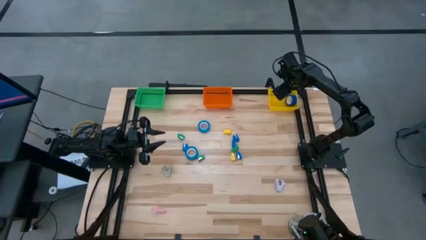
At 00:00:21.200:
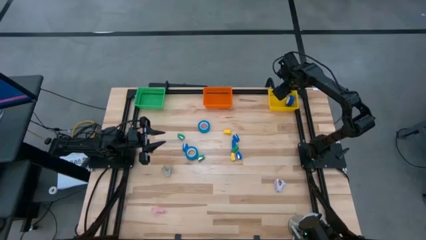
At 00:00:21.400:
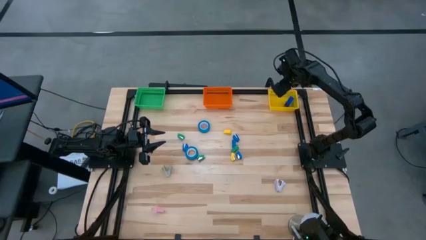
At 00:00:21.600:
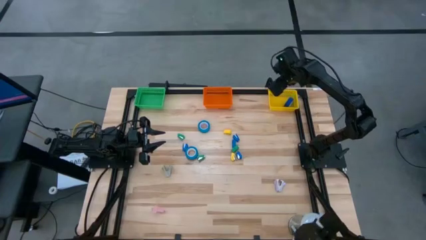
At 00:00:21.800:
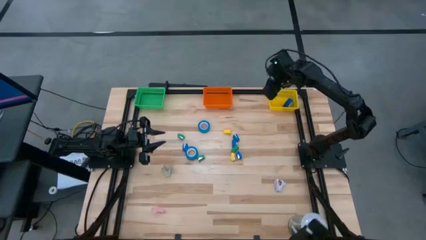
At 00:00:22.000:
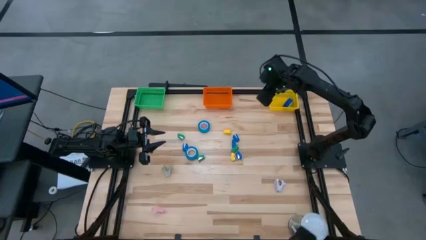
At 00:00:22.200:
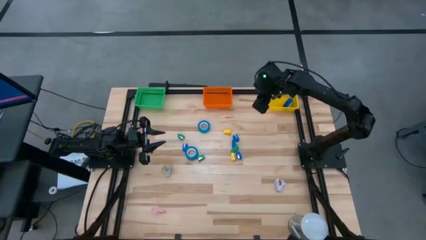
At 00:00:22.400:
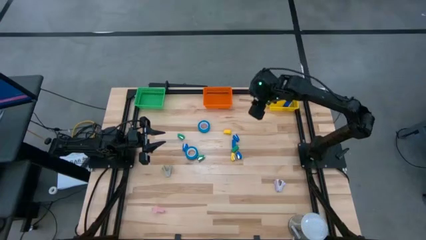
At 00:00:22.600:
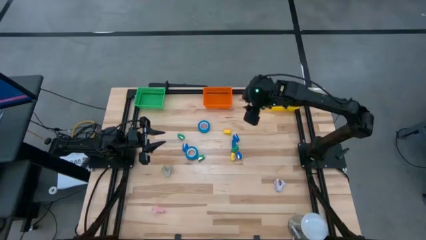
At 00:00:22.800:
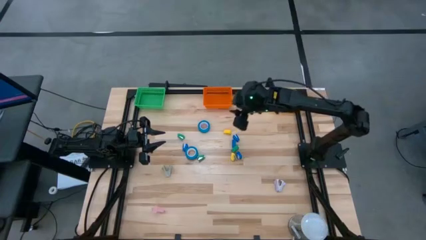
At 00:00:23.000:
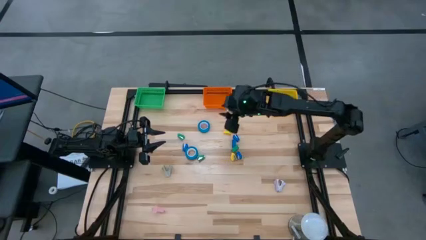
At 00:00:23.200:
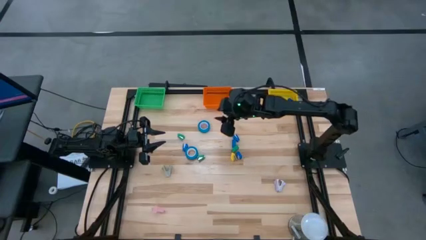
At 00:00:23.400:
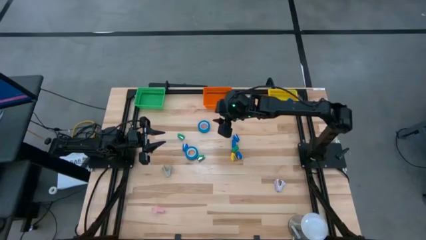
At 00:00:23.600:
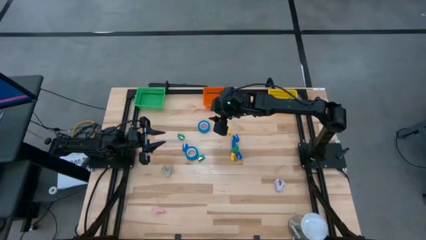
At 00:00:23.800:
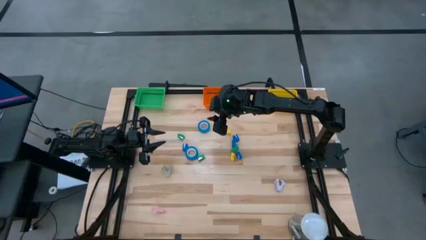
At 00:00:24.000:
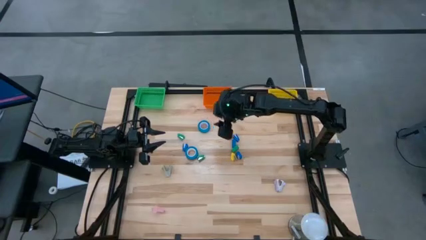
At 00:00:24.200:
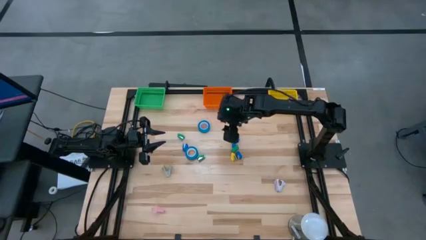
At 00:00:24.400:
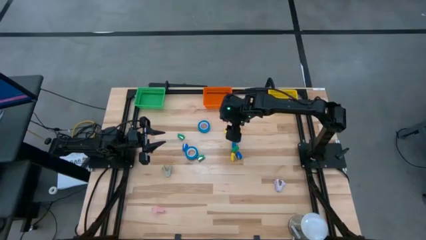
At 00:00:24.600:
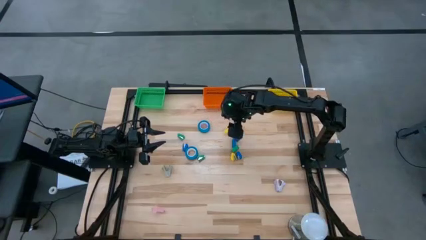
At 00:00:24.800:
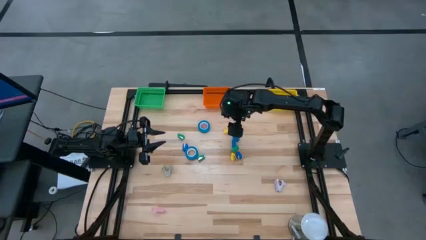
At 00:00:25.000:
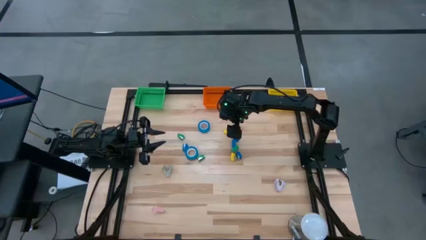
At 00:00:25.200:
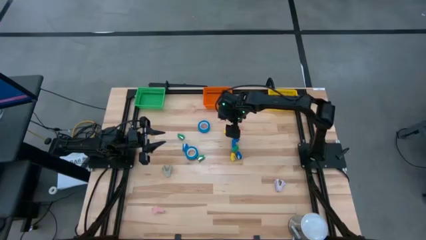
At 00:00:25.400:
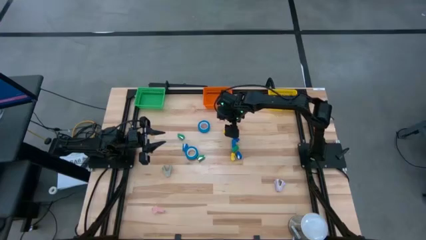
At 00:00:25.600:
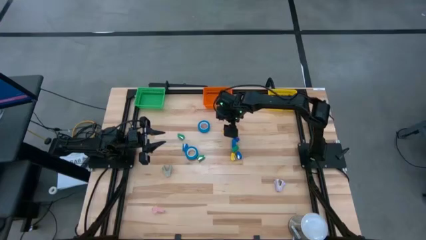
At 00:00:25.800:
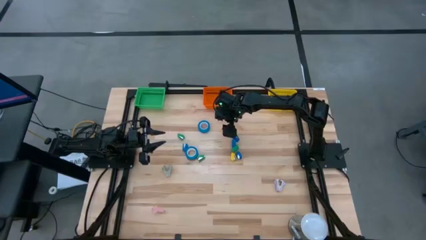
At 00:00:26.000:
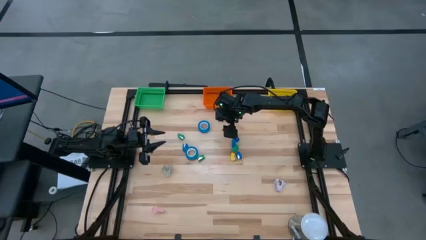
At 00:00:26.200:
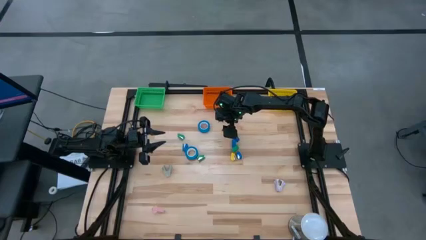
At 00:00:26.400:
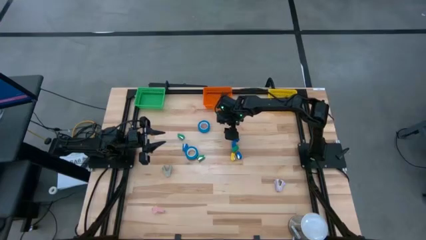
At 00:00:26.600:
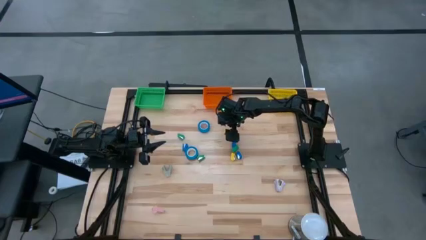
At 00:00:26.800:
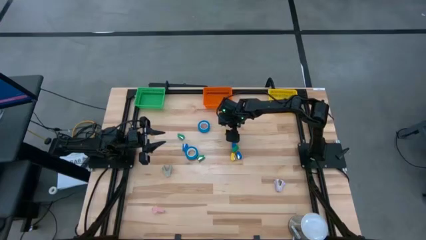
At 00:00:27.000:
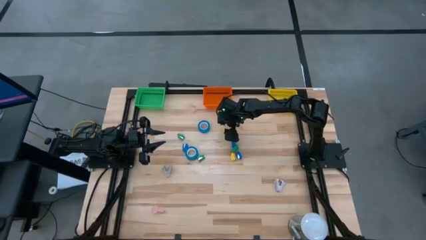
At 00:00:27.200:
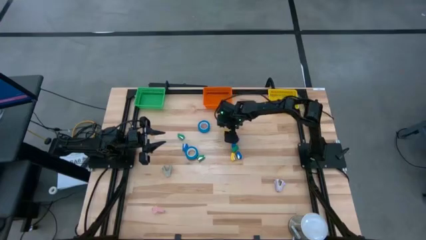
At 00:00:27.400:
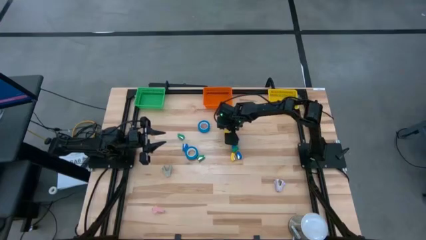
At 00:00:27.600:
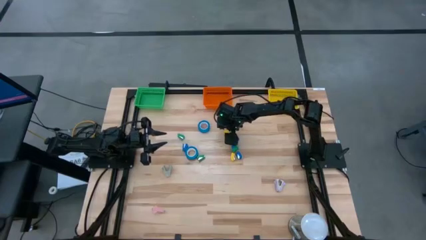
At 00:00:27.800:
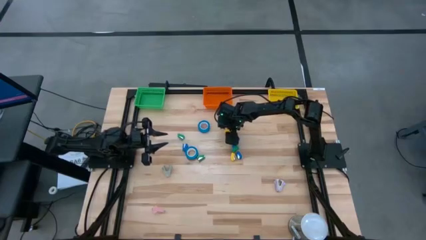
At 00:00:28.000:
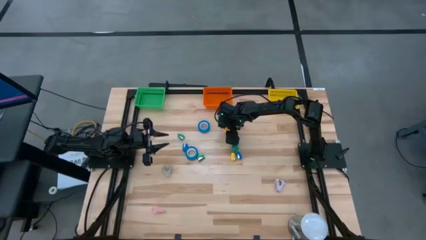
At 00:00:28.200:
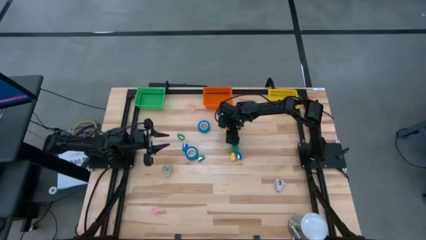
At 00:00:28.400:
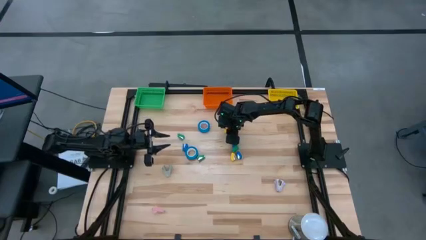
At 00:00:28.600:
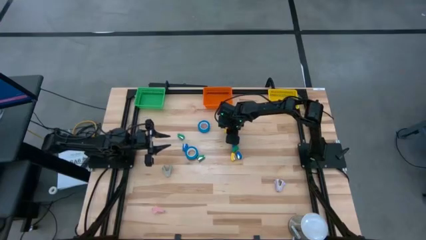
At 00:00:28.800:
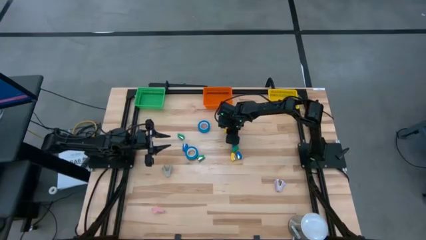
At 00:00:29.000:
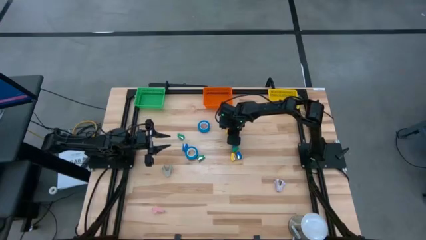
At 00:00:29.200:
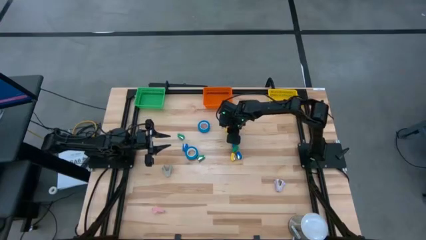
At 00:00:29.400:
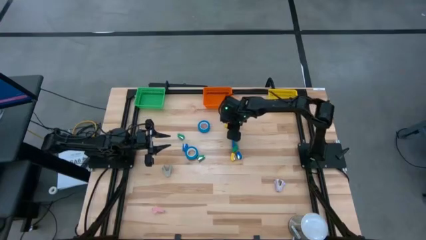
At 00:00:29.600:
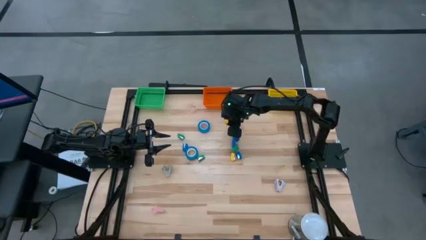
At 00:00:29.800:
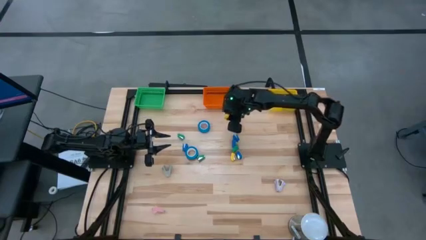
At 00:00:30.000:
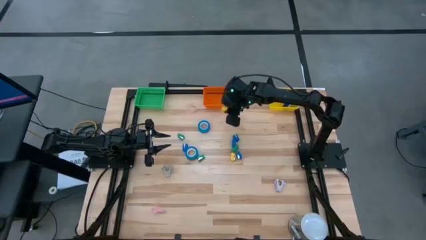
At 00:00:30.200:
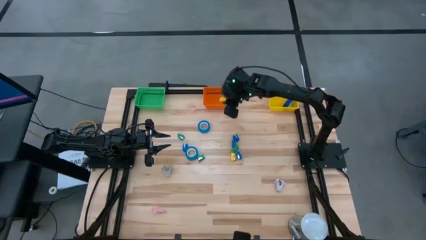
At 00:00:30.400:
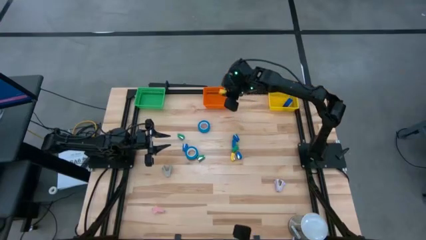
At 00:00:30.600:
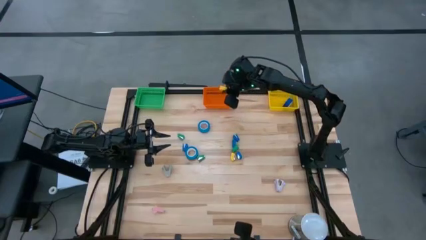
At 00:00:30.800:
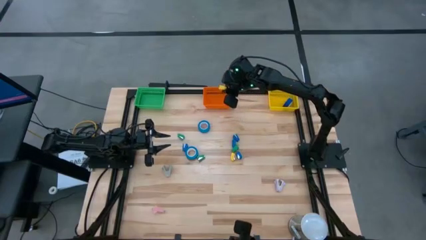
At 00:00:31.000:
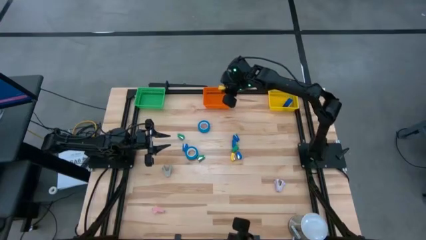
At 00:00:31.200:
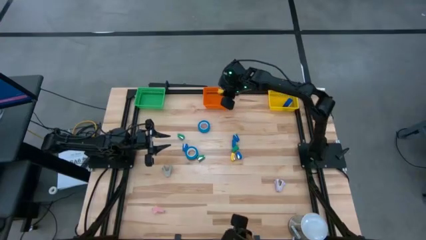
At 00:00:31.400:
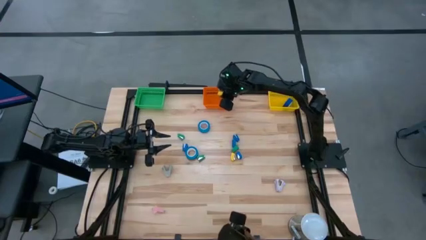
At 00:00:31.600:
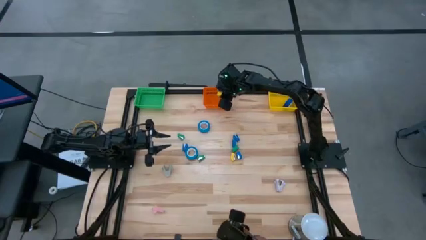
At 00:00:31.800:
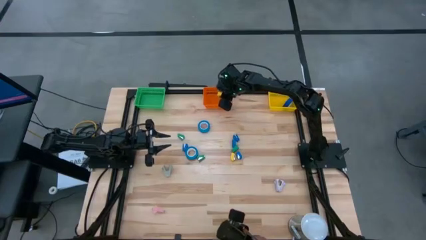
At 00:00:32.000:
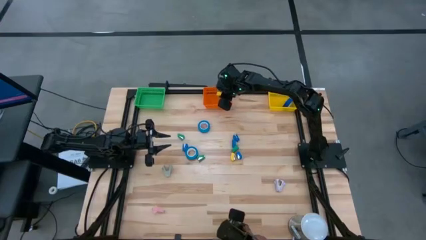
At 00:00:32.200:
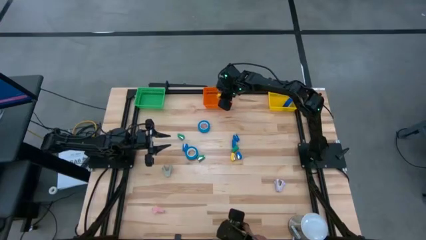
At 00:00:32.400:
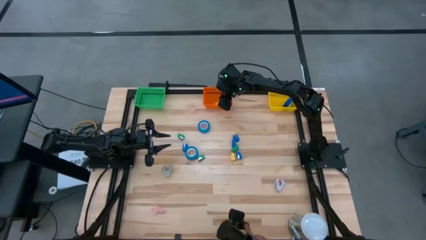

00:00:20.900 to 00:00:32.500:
Task: Pick and place Stapler, Stapler remover, tape
Put the yellow stapler into the orange bin

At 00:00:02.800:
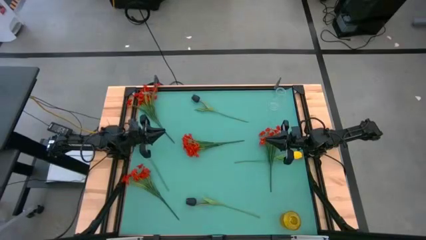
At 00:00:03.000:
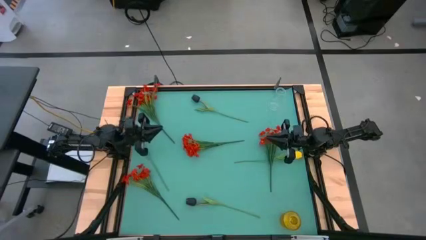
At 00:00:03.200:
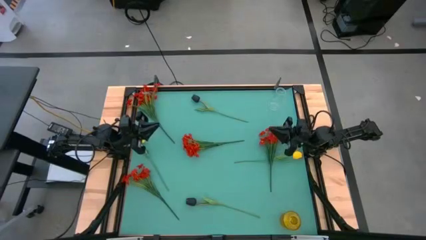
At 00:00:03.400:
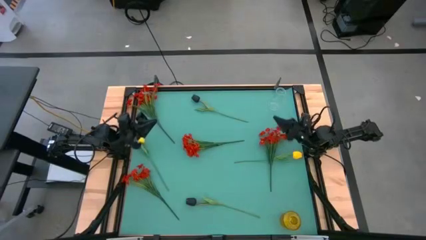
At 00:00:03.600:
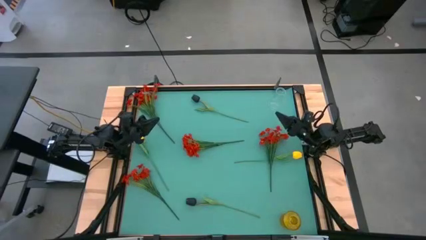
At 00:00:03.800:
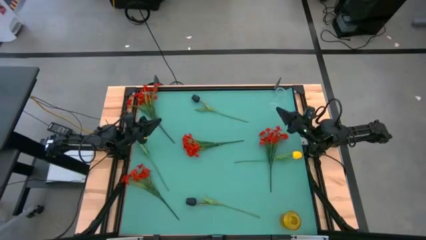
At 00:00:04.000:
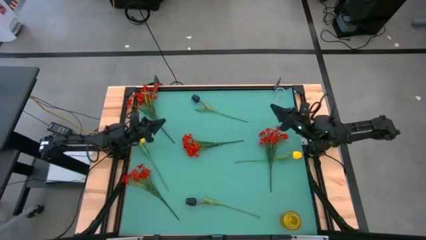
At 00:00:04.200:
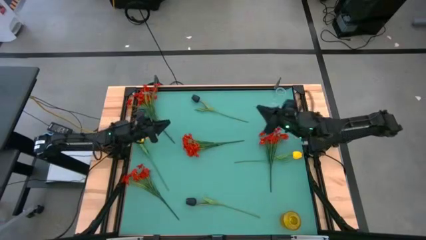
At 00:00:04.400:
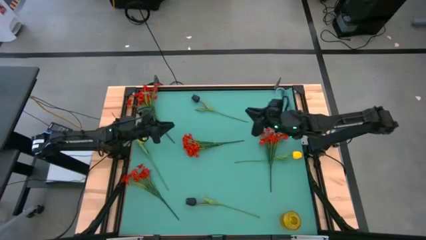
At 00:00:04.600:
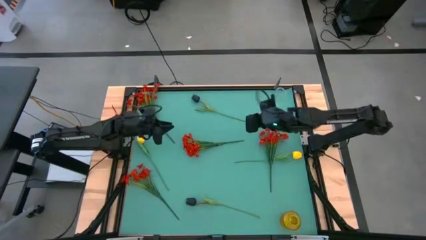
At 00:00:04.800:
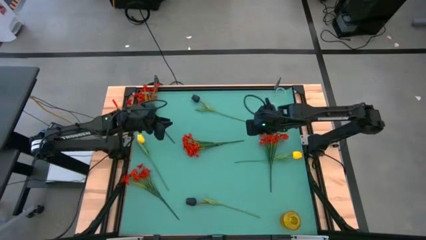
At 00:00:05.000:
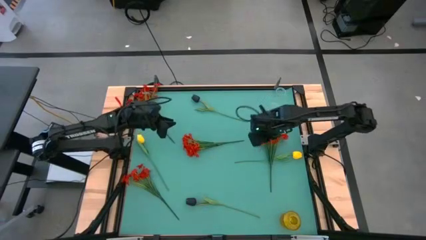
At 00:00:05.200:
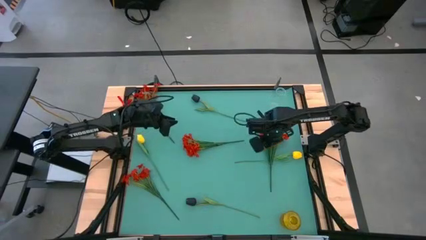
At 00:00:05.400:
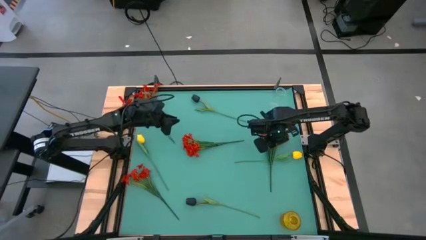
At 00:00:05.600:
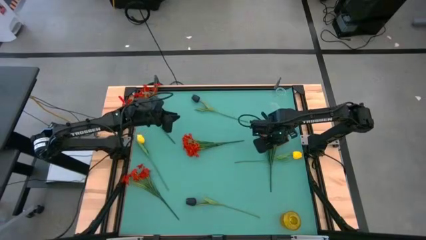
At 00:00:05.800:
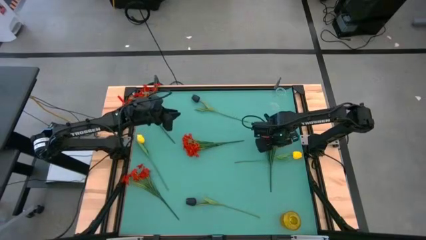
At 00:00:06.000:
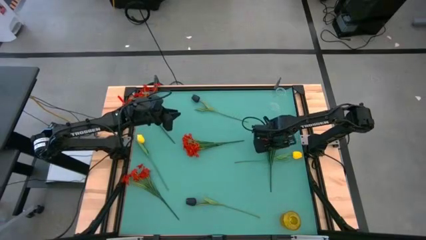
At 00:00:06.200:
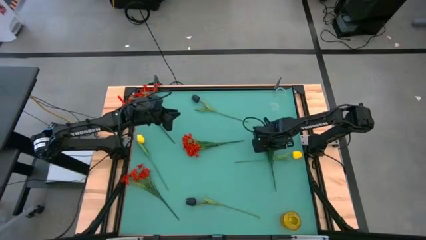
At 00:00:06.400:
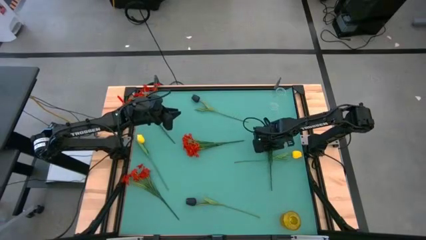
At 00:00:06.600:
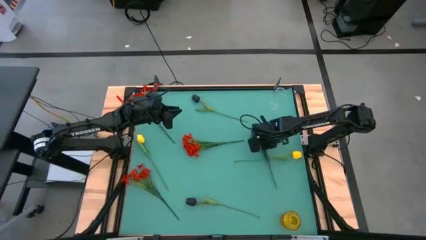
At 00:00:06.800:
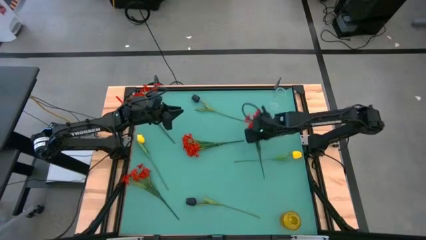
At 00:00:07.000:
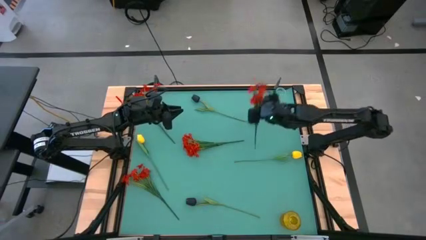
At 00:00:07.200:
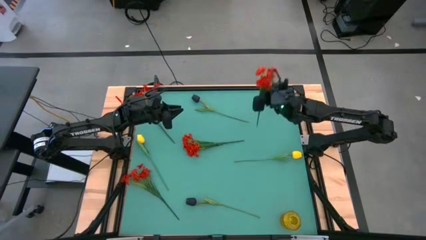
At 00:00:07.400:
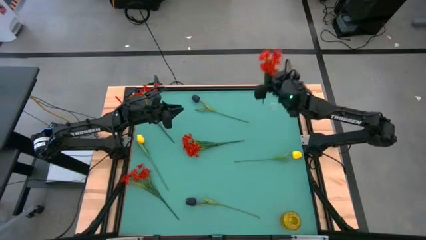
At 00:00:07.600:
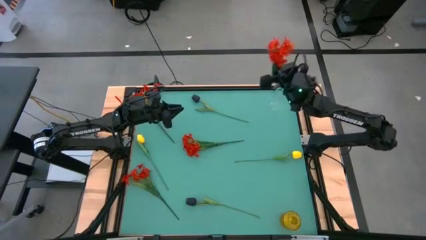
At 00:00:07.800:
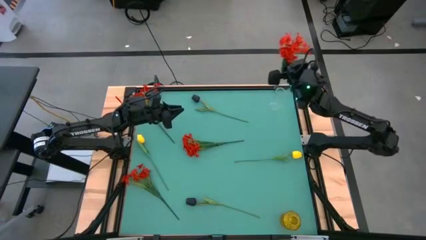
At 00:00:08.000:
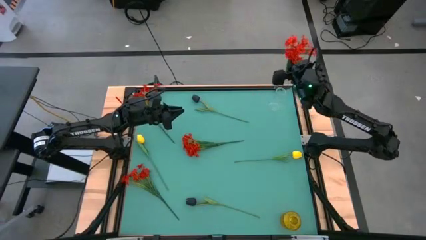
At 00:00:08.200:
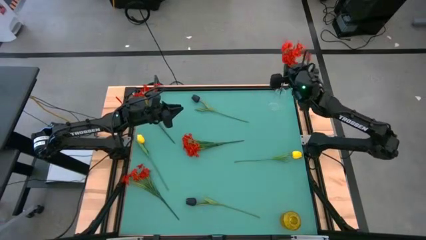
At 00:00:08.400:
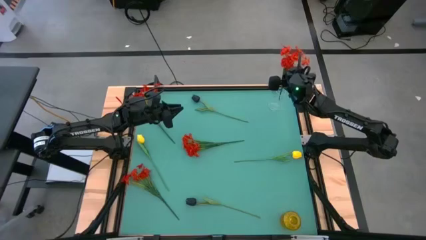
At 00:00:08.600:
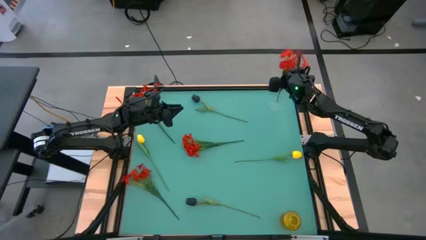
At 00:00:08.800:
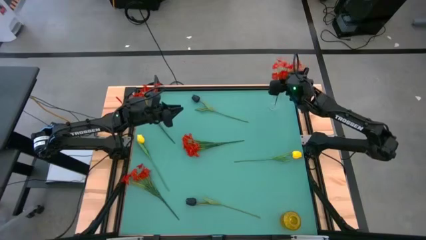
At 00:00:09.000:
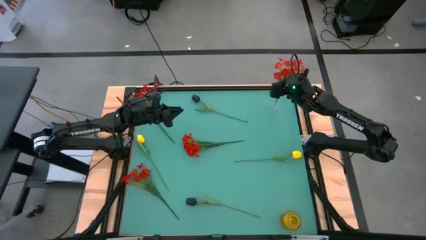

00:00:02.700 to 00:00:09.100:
Task: Sort flowers into vase by color
Put the red flowers into the transparent vase
